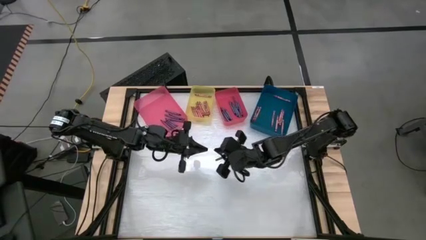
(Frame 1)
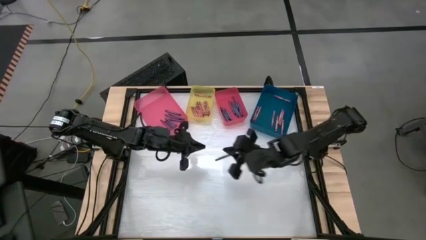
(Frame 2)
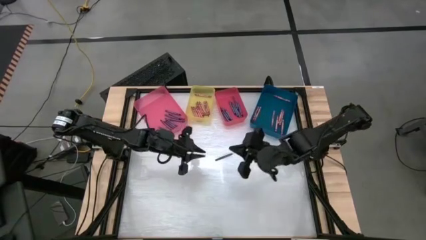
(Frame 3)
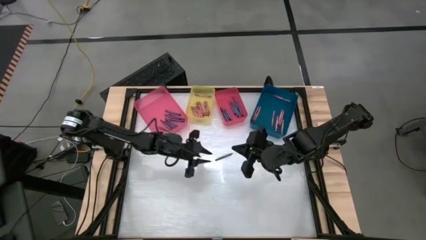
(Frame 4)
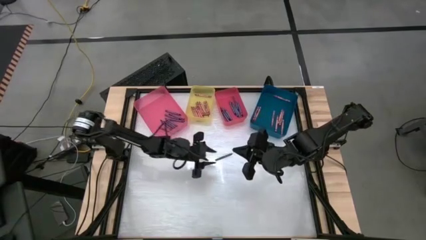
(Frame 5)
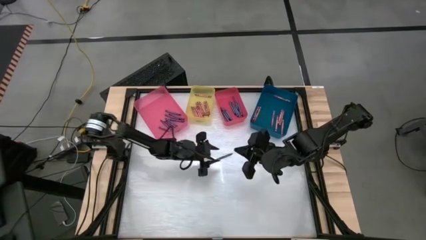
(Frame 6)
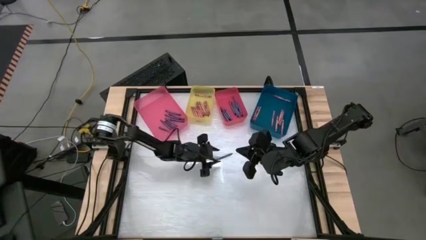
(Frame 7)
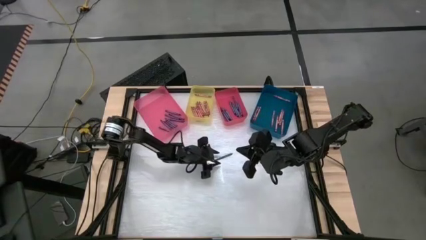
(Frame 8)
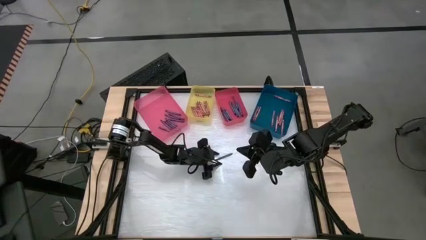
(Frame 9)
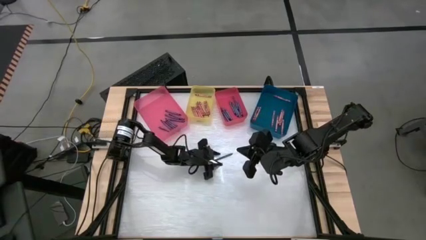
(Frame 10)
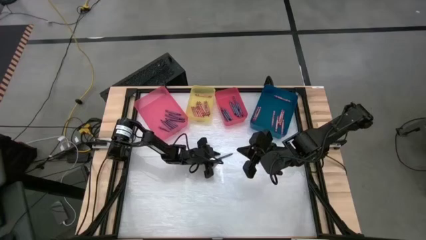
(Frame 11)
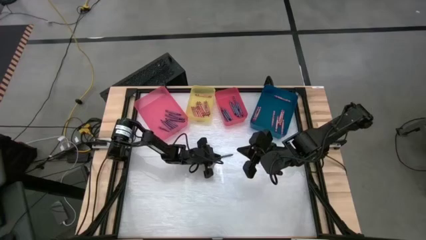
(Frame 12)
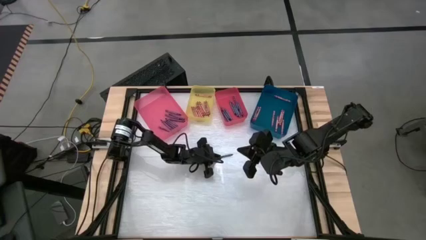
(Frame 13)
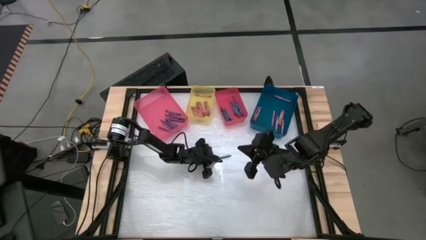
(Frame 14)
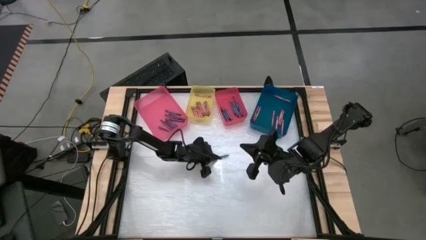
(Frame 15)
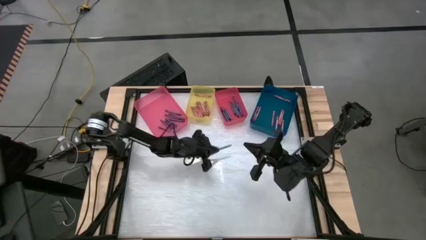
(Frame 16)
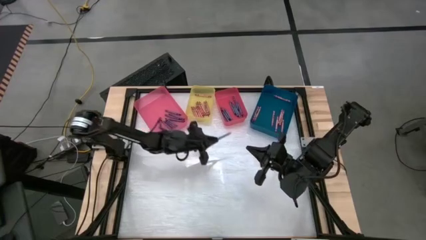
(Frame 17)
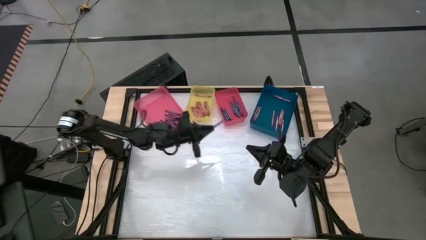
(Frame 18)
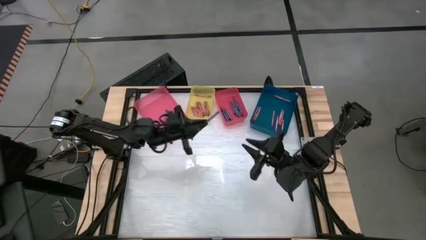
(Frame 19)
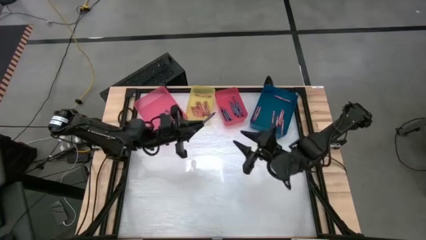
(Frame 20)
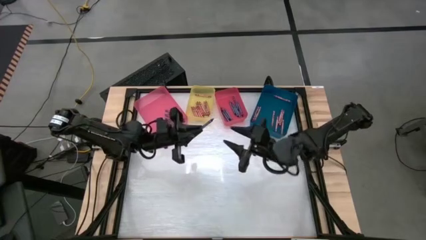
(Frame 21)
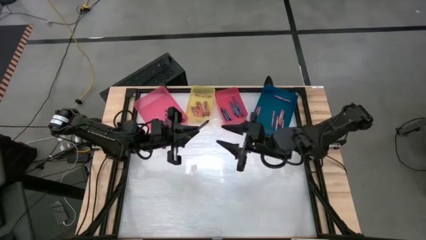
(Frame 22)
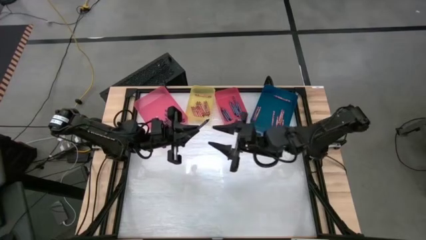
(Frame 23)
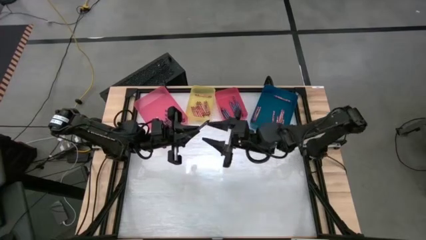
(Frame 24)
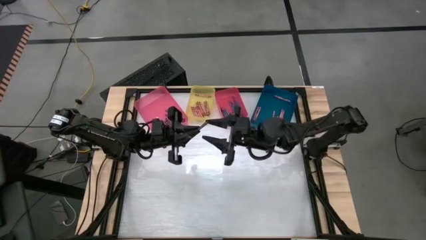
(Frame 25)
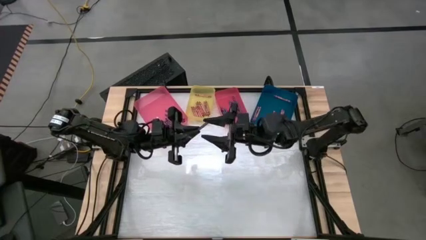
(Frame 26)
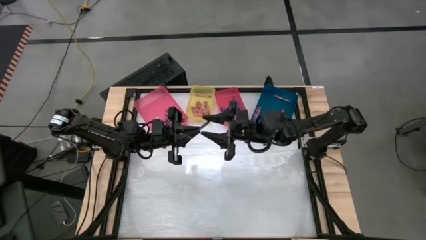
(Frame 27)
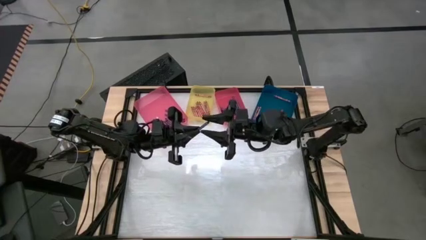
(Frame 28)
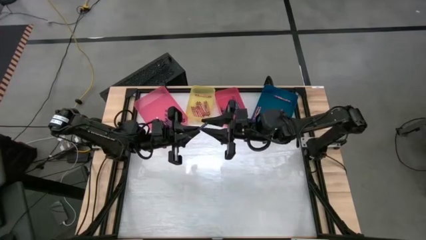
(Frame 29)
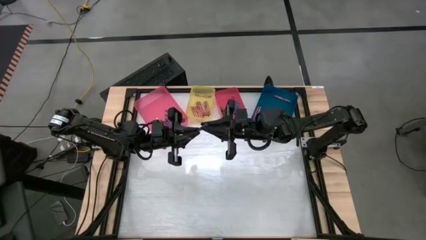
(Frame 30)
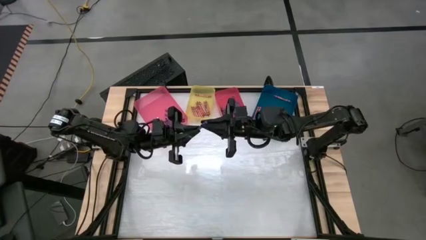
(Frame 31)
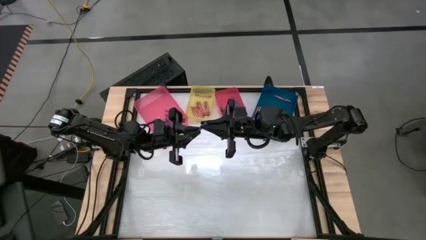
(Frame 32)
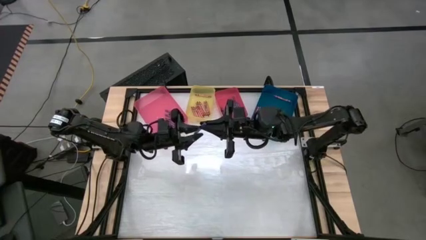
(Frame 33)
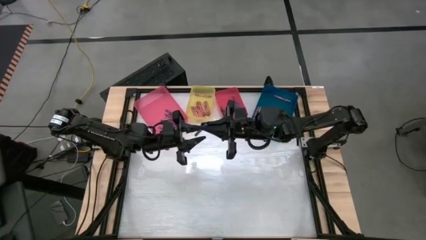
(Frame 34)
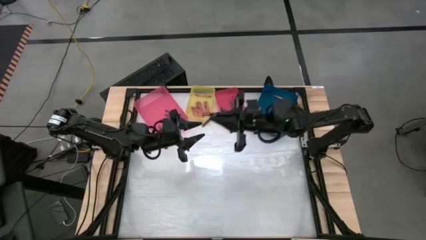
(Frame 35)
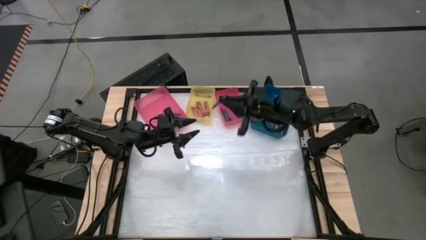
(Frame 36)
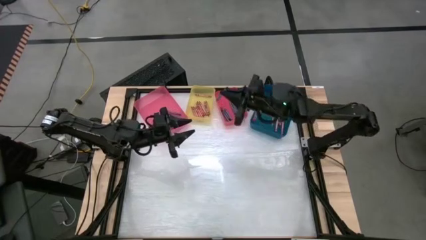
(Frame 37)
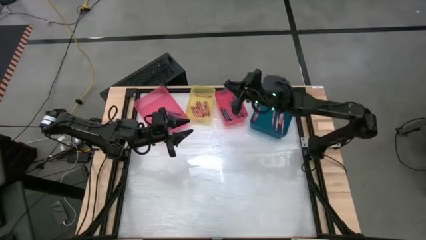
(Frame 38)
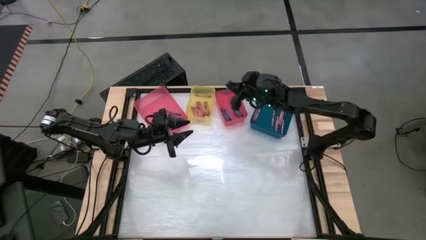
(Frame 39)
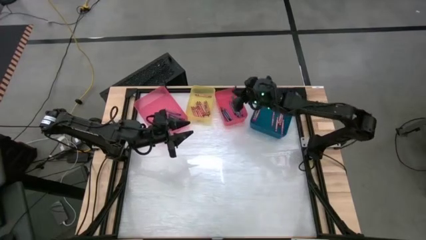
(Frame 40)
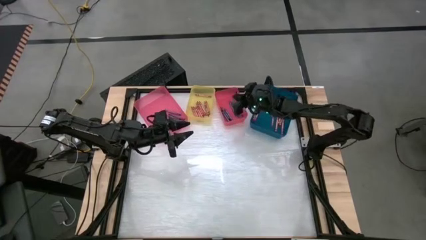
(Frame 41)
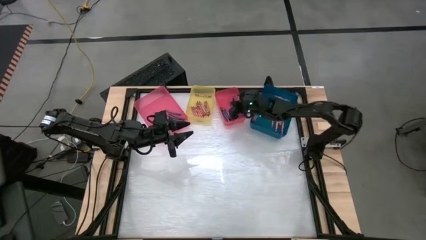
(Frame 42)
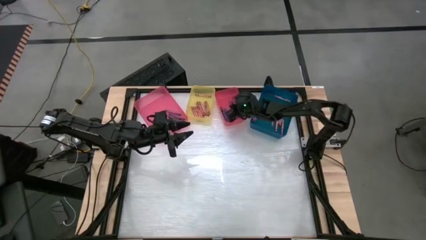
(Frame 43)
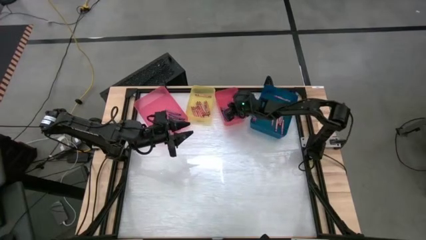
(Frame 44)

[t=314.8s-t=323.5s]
Task: Sort crayons
Put the blue crayon into the red bin

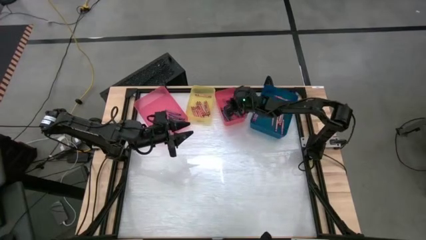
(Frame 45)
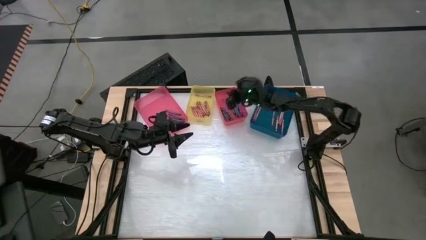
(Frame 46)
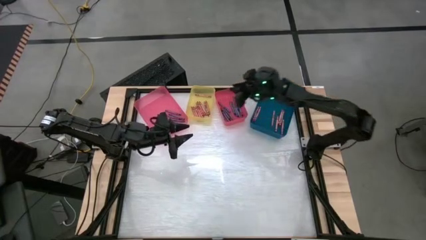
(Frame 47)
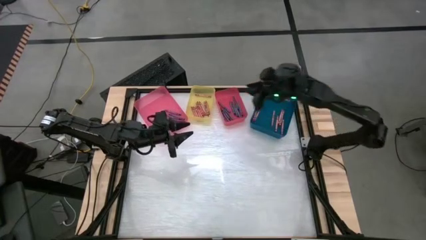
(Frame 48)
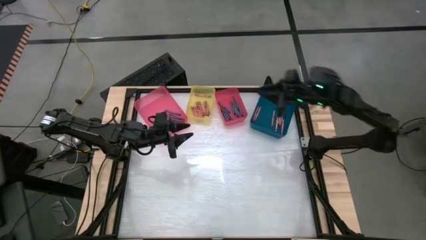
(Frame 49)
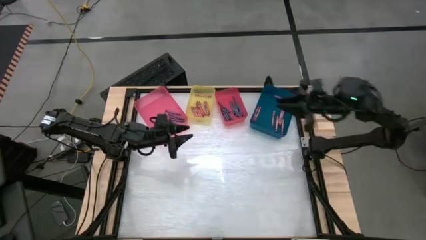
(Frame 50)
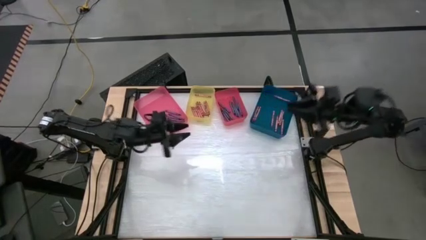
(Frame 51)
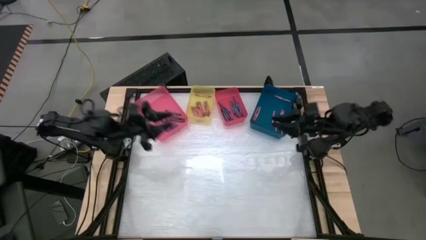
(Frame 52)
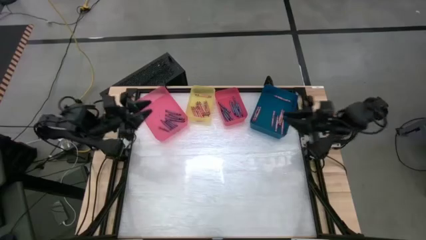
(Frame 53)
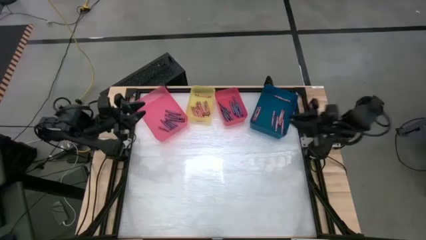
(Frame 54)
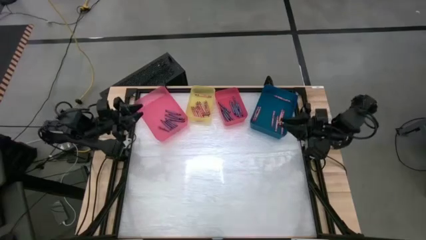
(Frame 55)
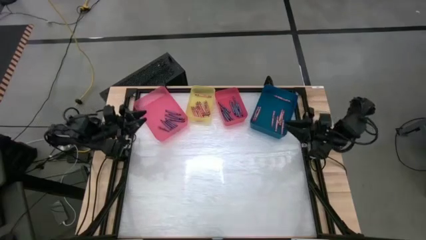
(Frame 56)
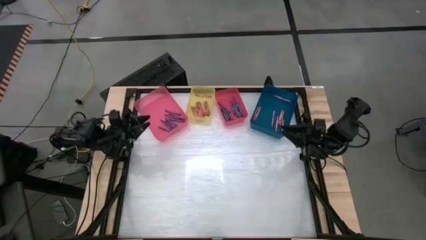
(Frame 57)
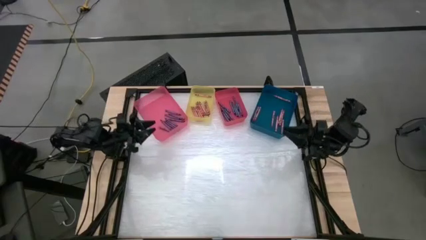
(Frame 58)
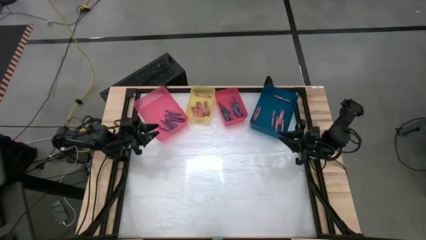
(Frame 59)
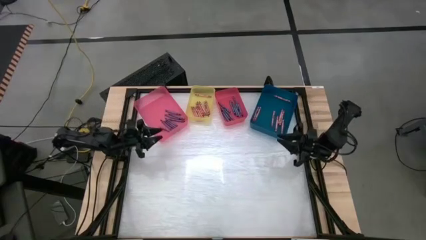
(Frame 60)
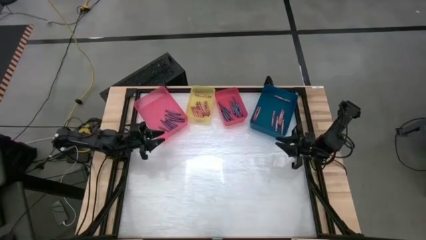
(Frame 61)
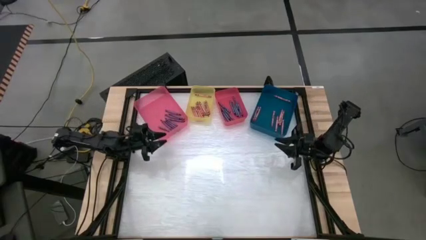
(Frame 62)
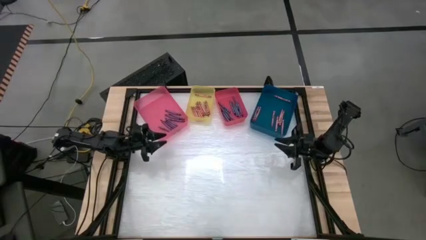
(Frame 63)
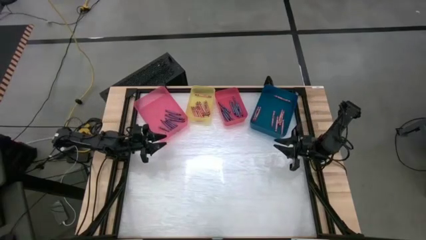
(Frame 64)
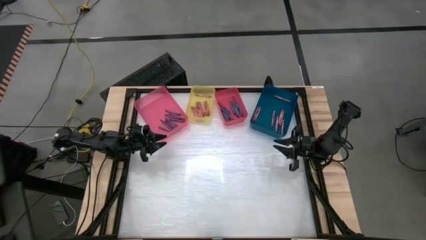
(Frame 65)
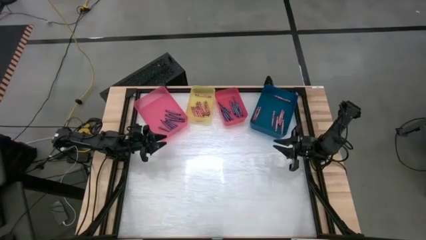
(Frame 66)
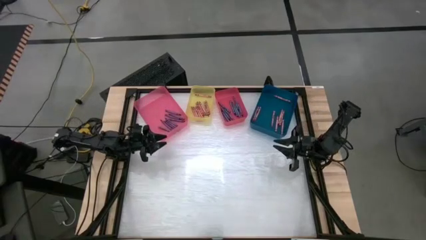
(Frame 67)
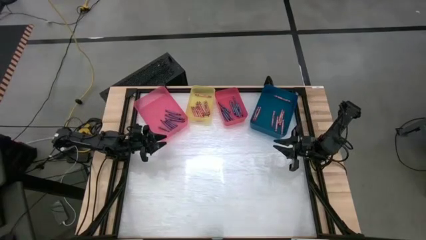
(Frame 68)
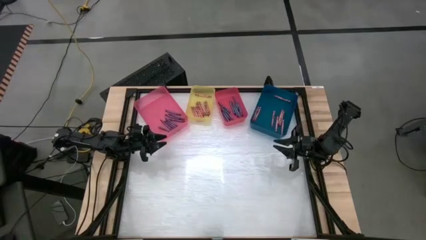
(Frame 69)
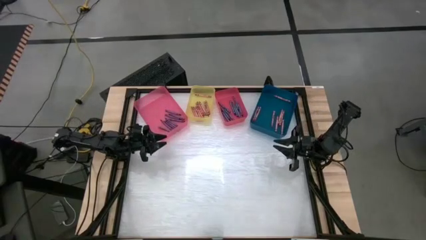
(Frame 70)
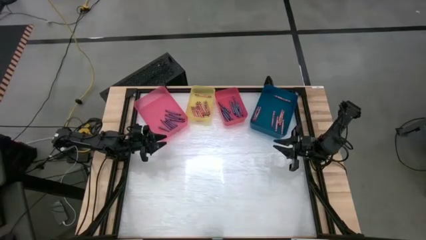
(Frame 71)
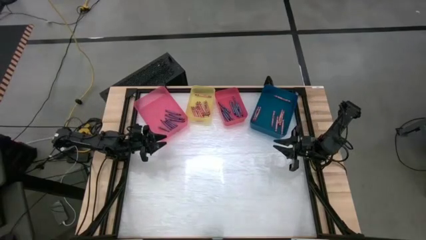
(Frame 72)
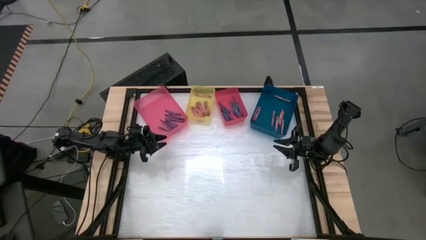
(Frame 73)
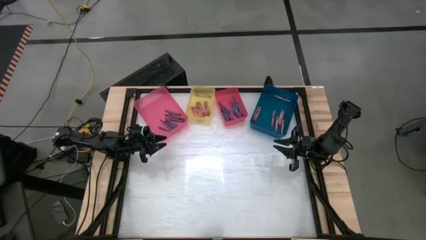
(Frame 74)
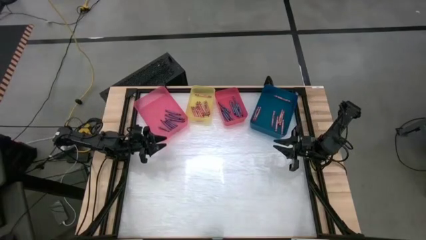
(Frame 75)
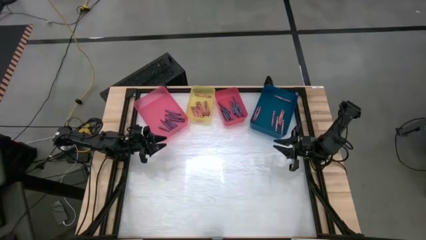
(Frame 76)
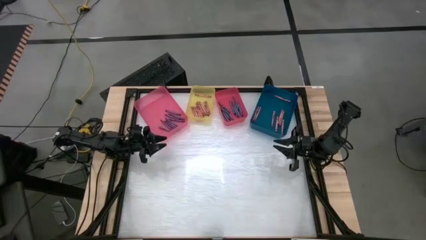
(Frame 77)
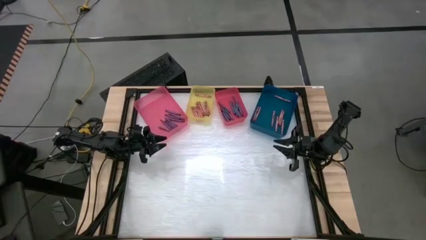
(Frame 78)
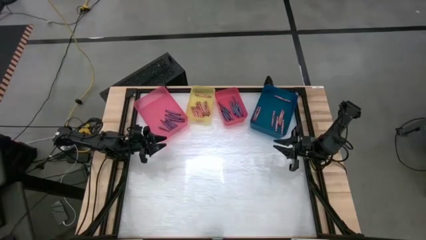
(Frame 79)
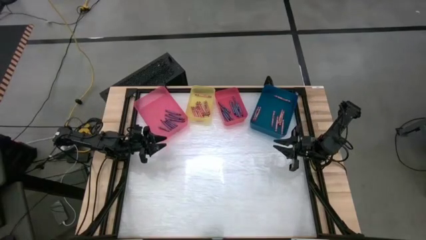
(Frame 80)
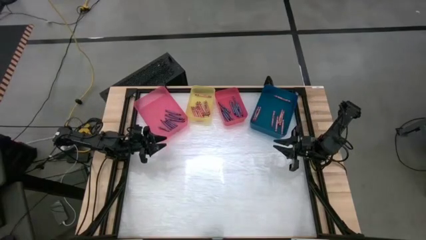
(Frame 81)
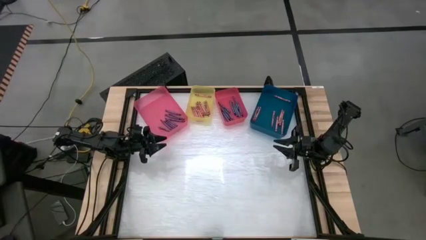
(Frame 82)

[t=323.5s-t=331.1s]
Return to Home Position
